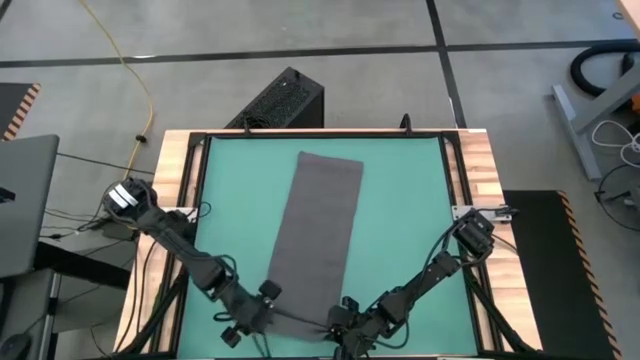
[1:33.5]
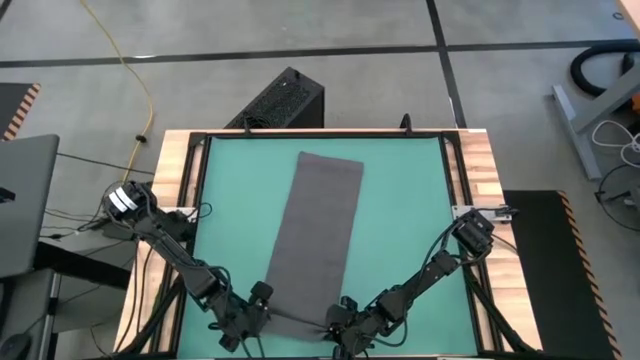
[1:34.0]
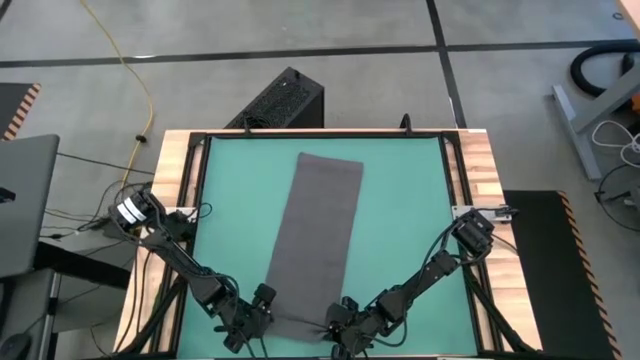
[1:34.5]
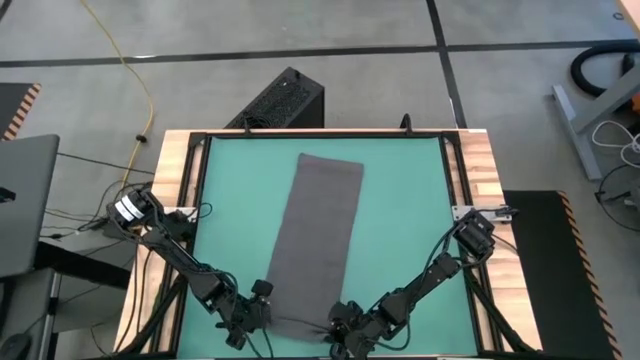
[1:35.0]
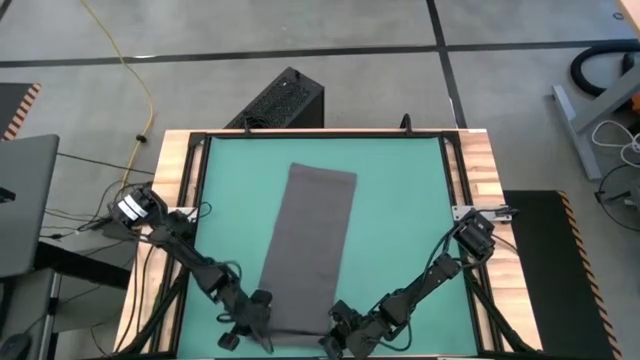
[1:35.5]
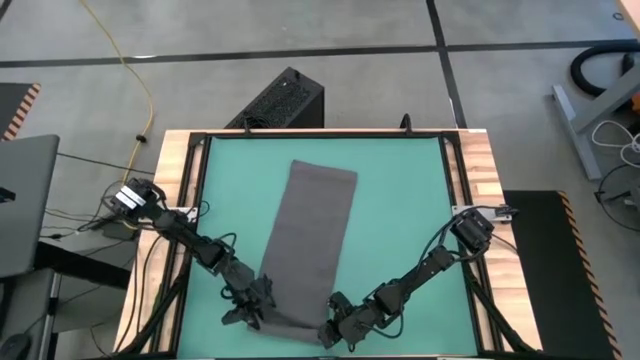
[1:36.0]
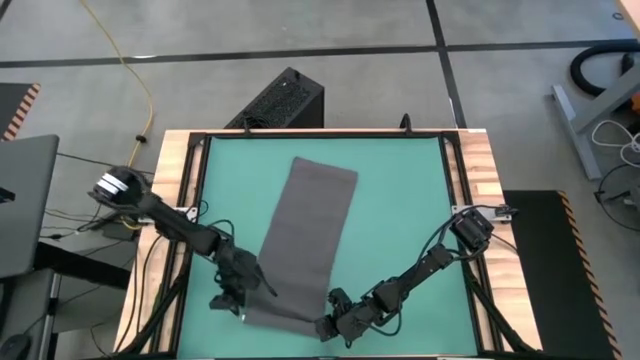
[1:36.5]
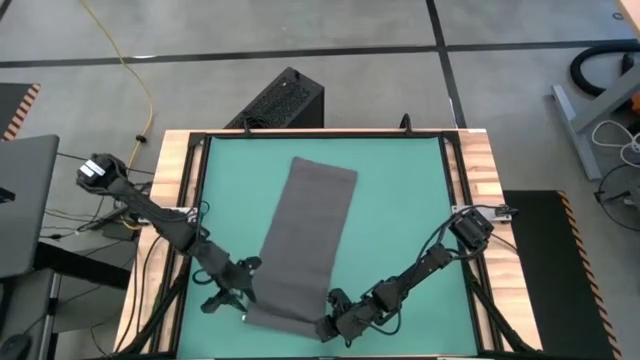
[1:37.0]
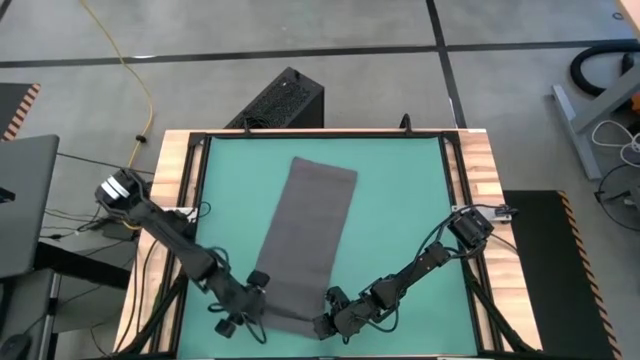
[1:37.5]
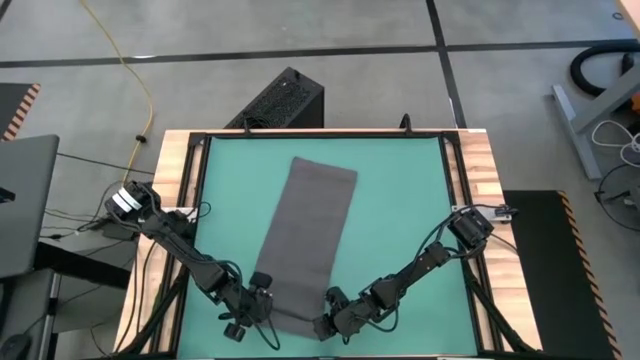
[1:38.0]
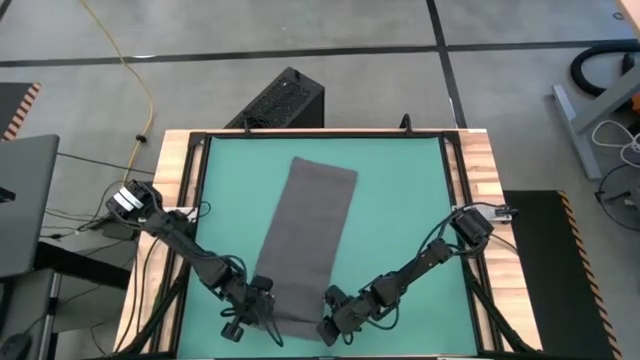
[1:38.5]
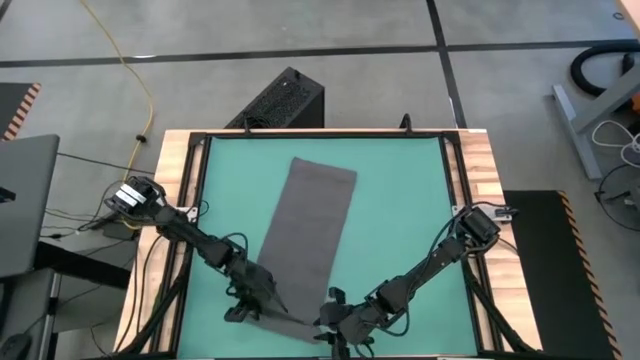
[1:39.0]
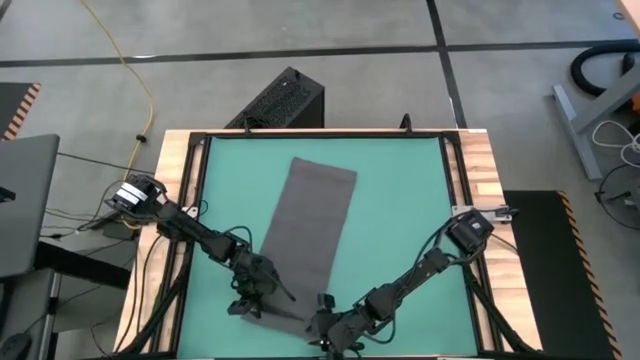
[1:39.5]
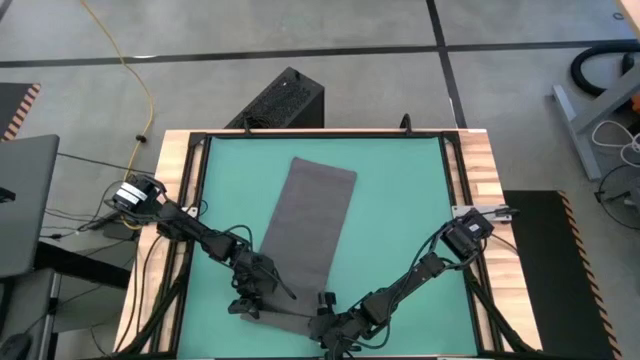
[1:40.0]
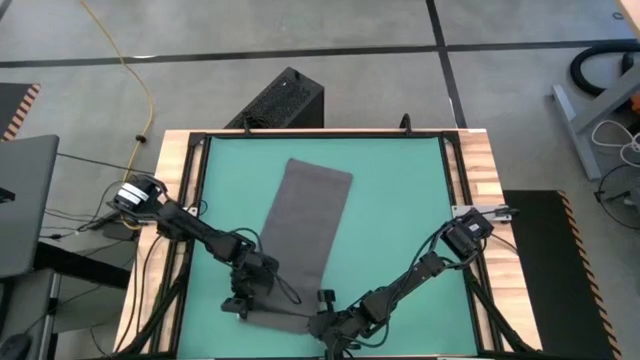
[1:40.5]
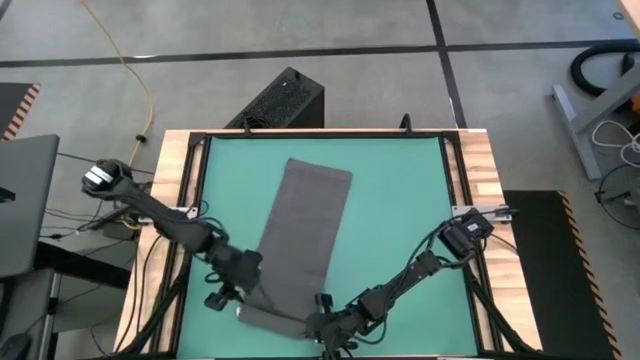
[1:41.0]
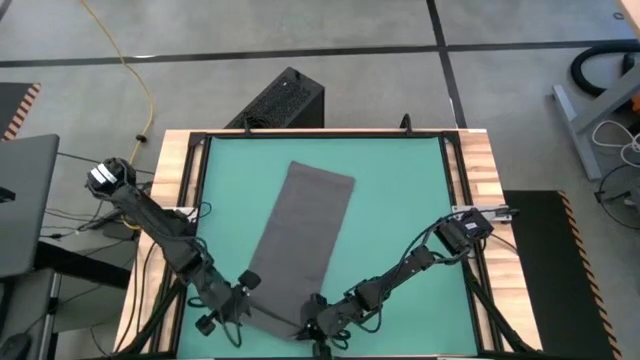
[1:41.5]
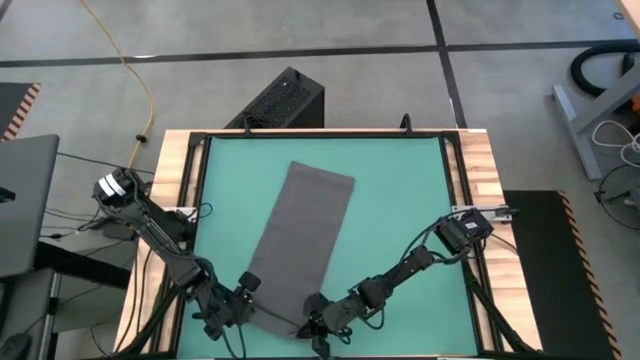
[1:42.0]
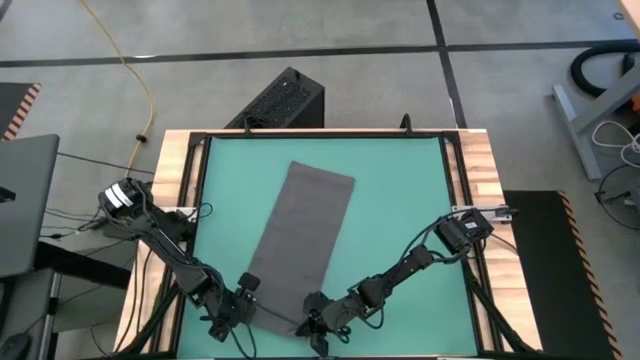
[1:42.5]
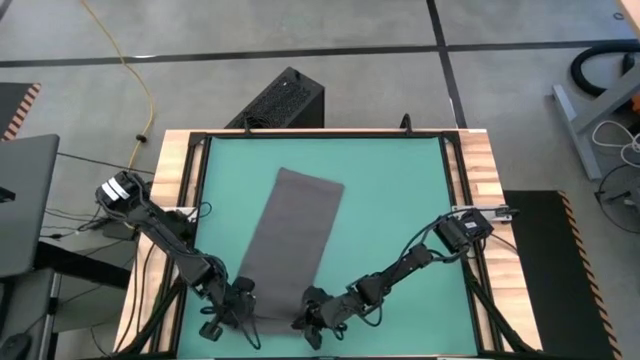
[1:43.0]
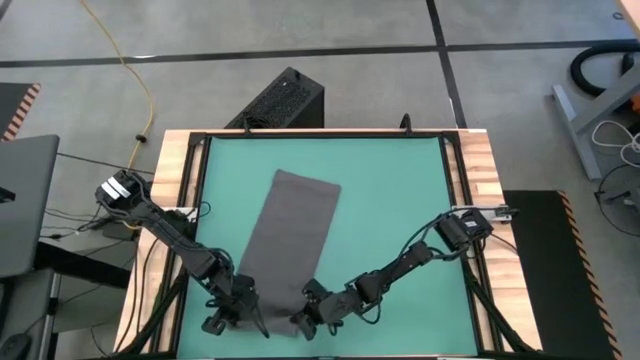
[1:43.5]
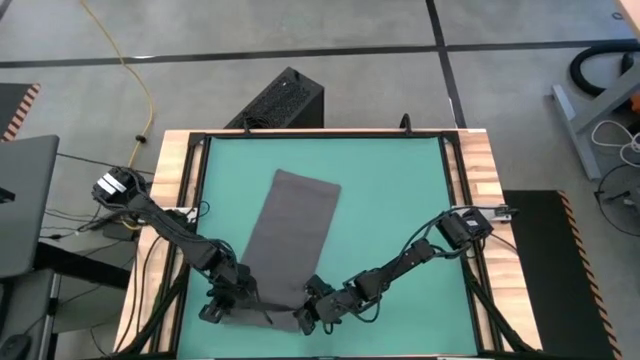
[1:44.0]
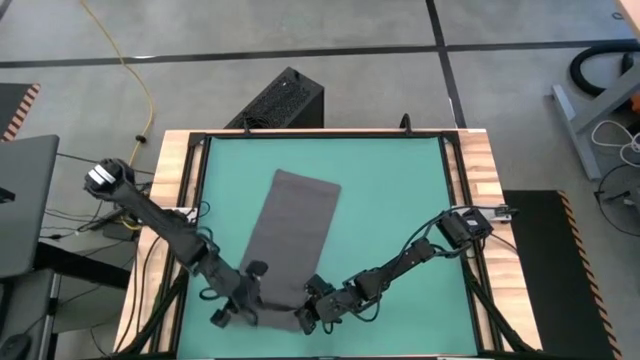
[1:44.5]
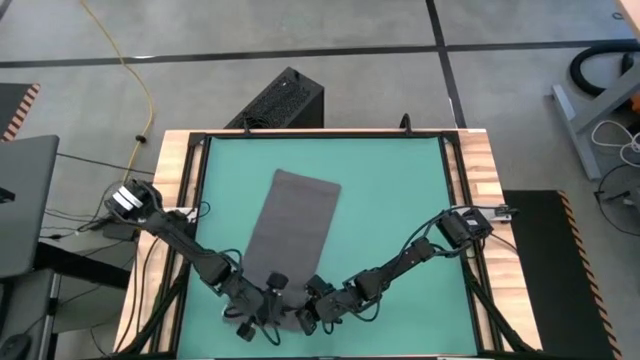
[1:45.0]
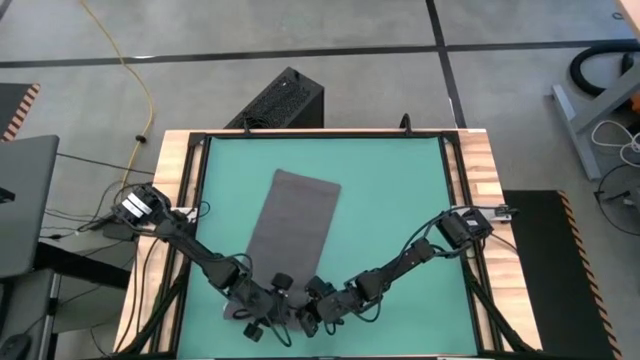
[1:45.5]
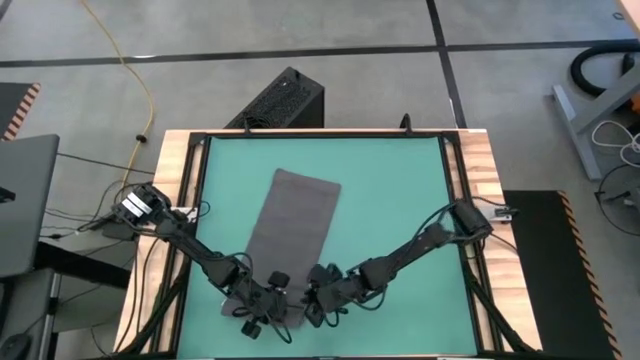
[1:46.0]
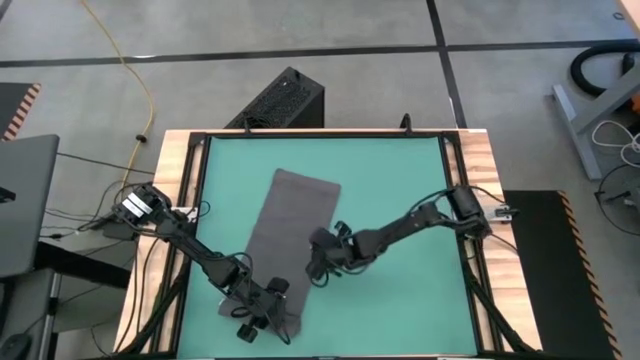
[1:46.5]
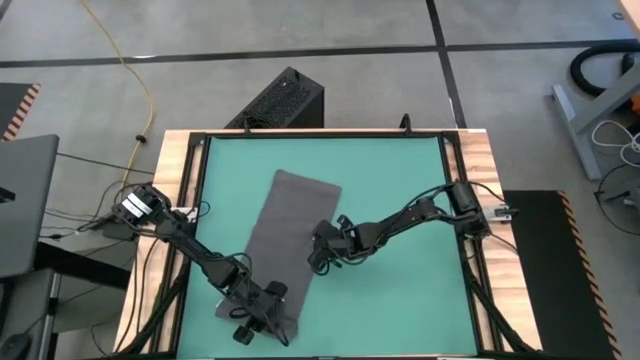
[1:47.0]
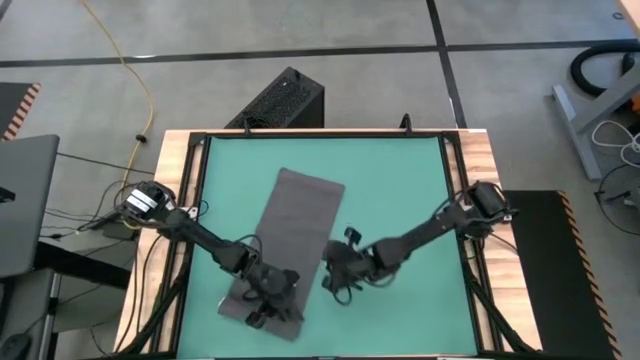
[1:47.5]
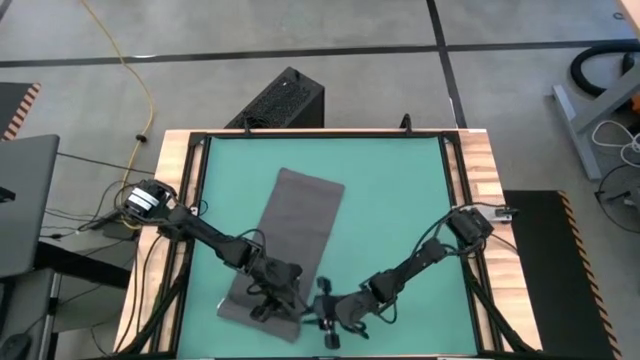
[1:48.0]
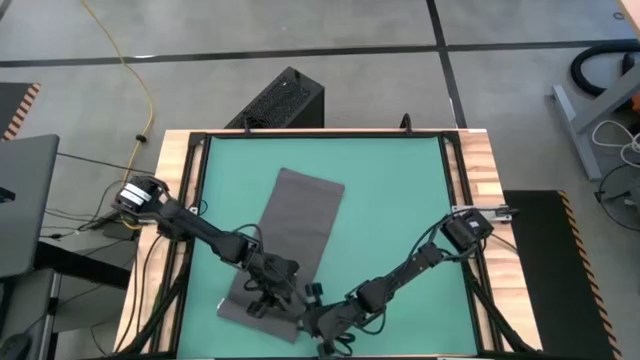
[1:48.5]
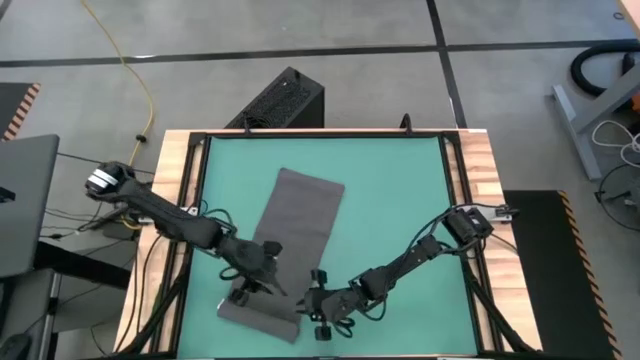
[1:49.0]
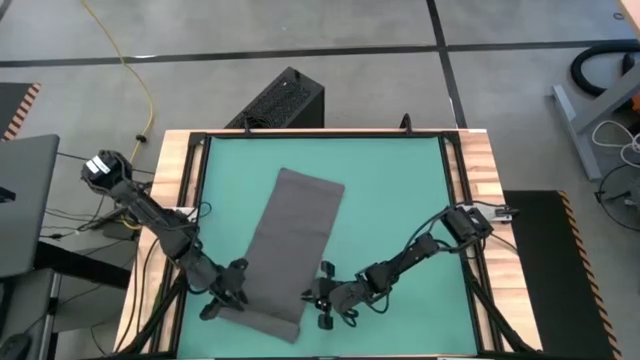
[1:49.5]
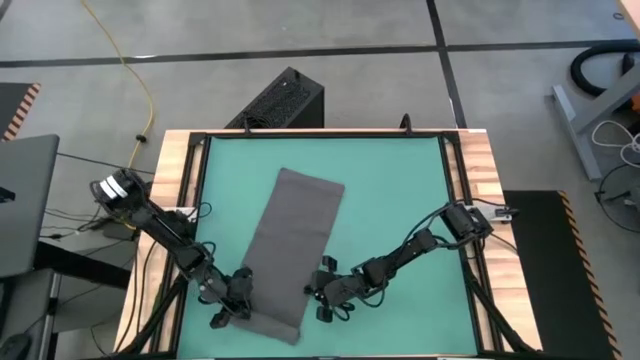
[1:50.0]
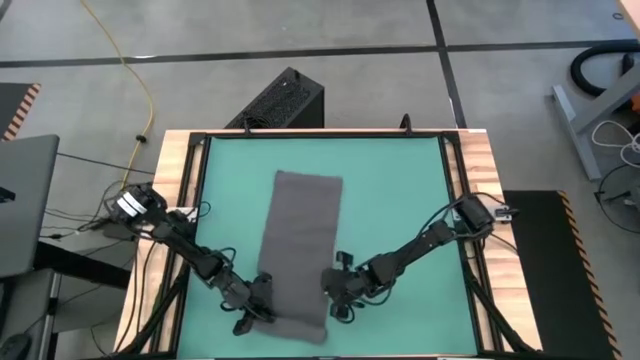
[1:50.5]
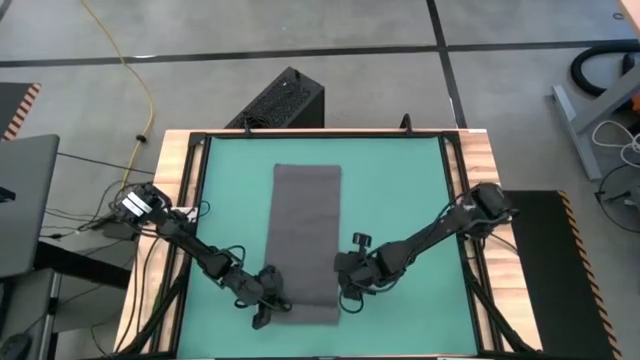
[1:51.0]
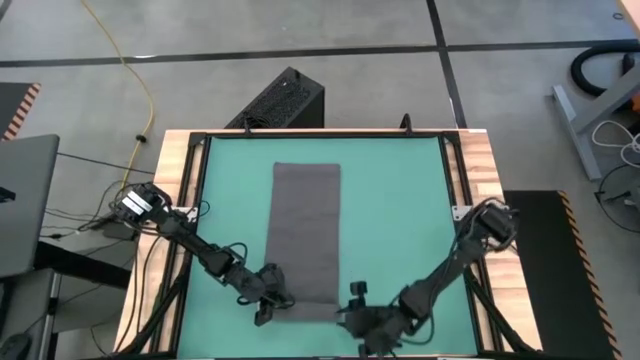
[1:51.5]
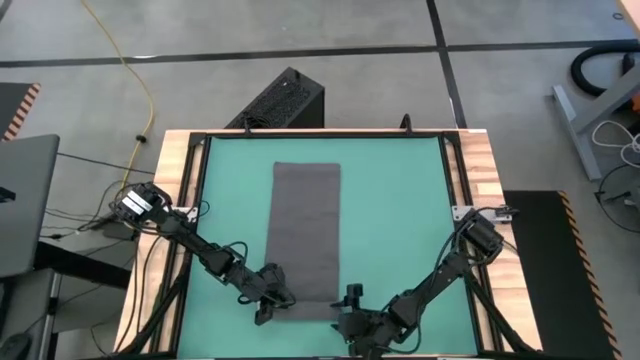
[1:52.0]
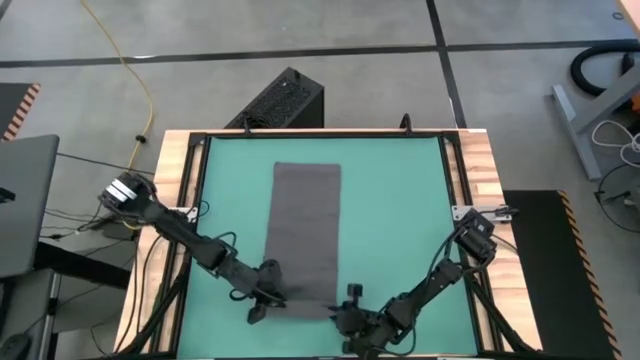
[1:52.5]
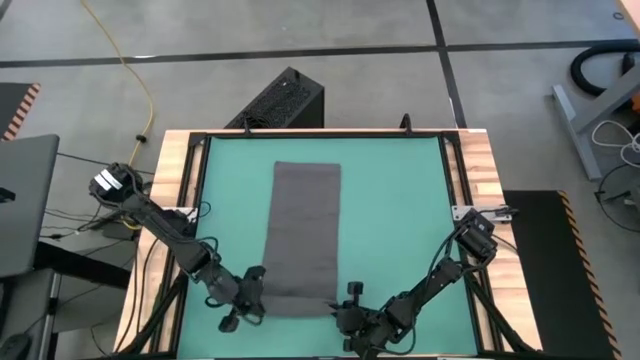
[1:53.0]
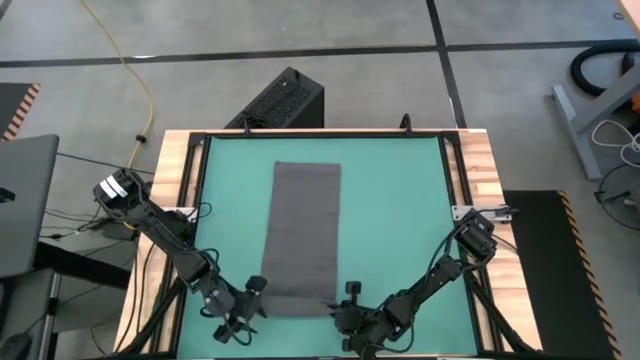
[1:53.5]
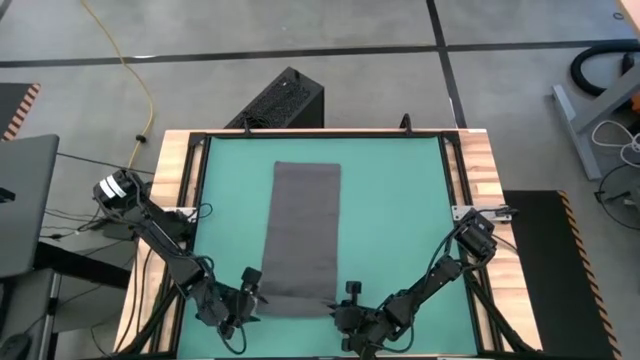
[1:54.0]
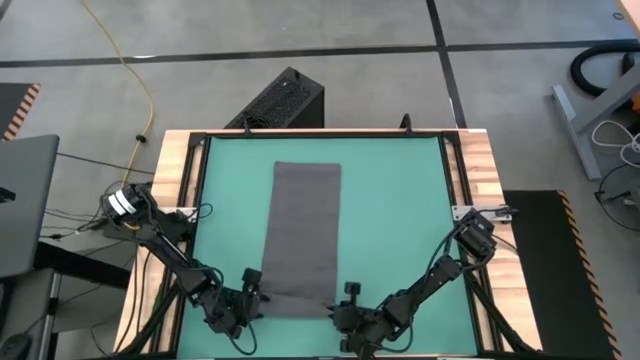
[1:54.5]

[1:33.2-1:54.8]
Task: Roll towel
Roll the gray towel

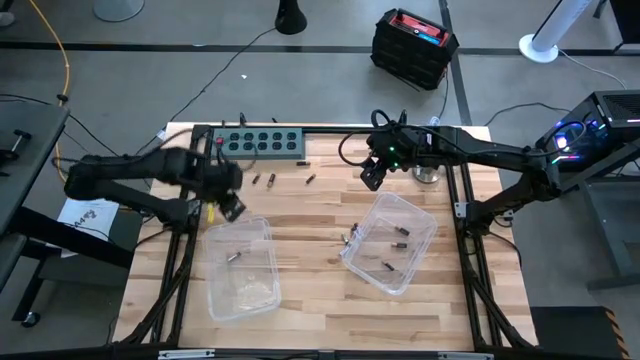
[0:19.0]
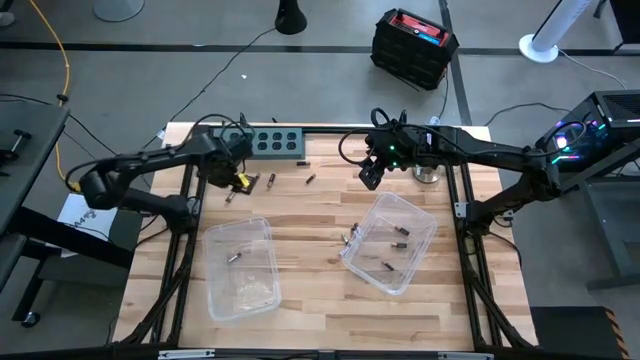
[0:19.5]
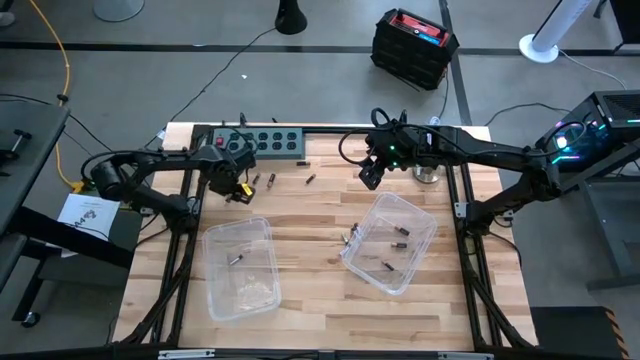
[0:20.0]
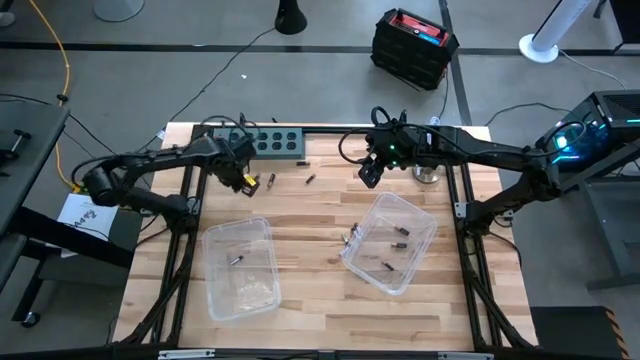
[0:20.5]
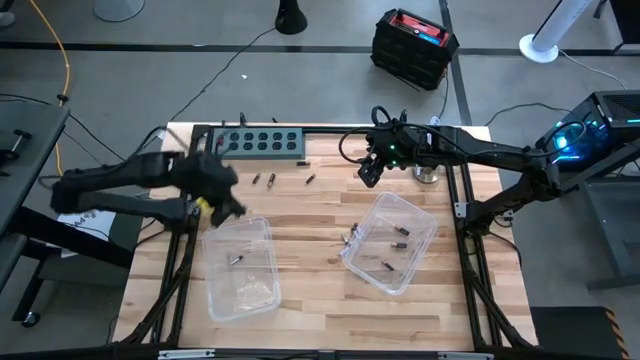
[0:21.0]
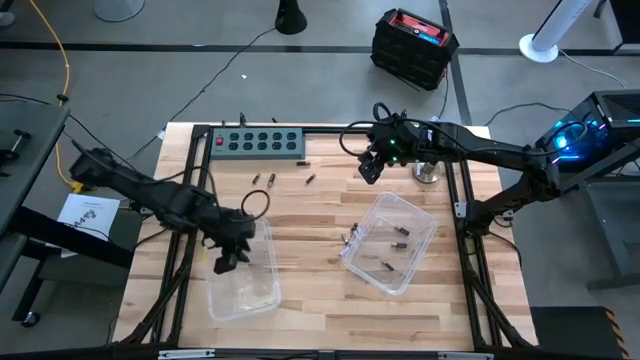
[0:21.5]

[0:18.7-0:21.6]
Task: Sort batteries
Put the silver battery into the left transparent bin
